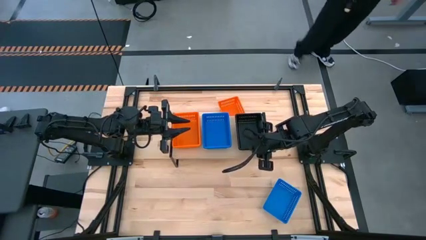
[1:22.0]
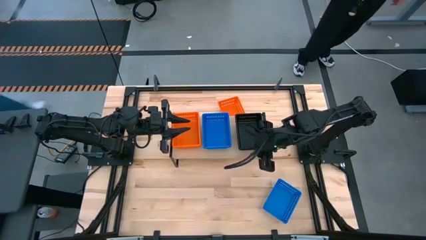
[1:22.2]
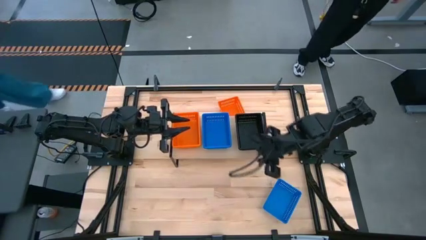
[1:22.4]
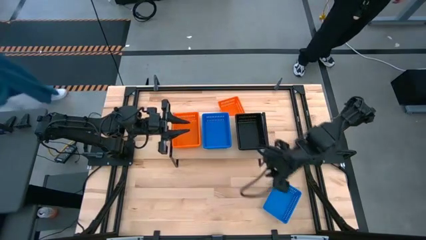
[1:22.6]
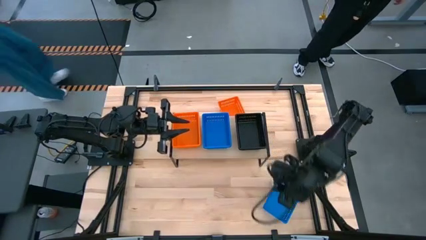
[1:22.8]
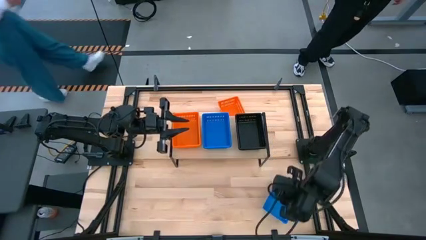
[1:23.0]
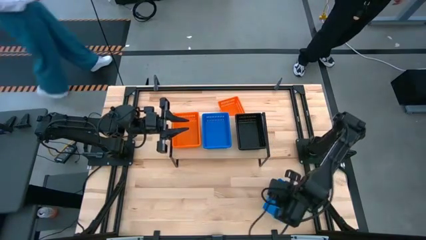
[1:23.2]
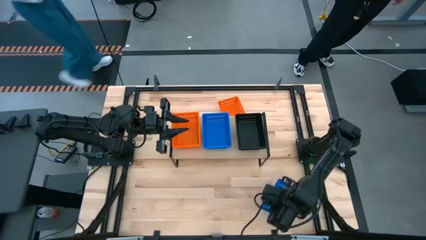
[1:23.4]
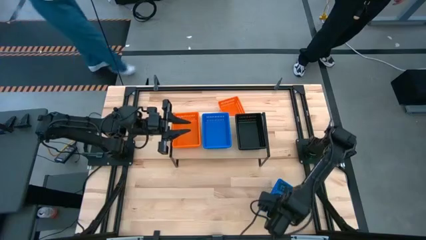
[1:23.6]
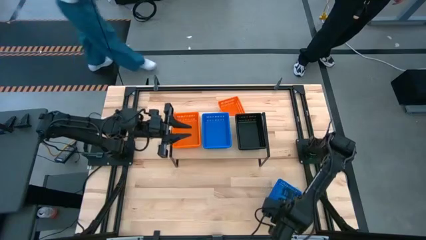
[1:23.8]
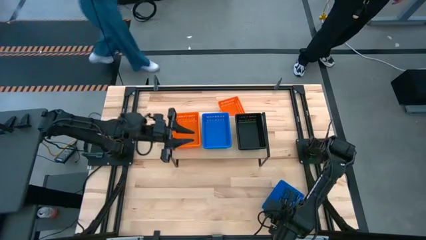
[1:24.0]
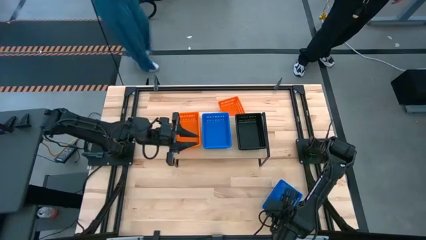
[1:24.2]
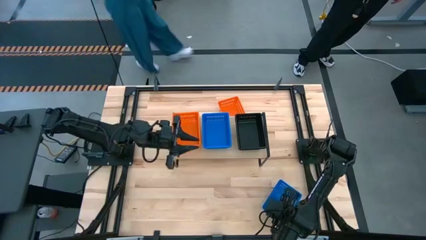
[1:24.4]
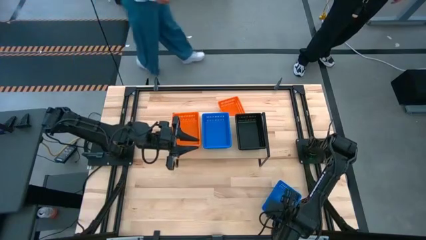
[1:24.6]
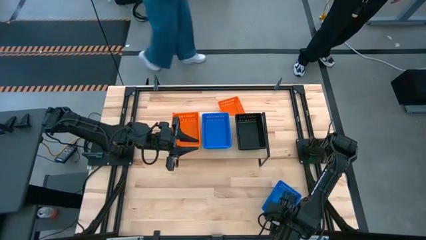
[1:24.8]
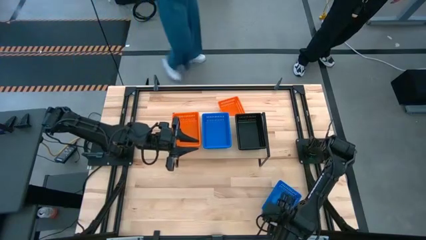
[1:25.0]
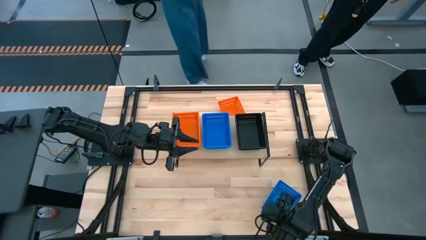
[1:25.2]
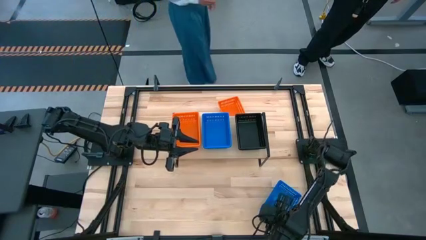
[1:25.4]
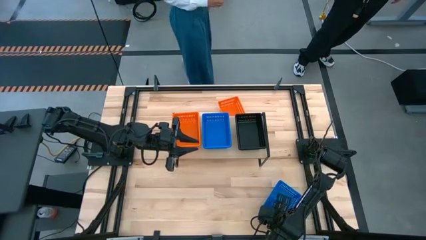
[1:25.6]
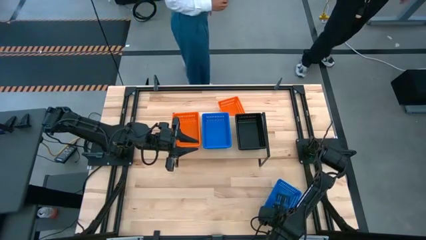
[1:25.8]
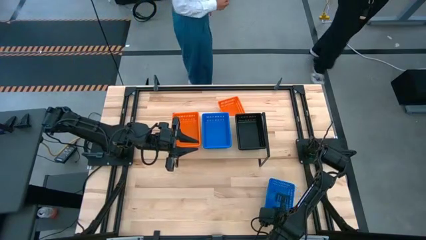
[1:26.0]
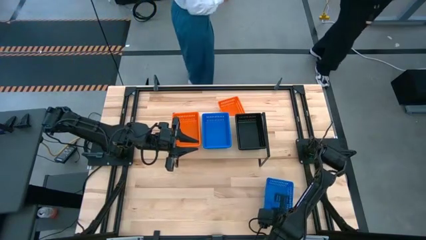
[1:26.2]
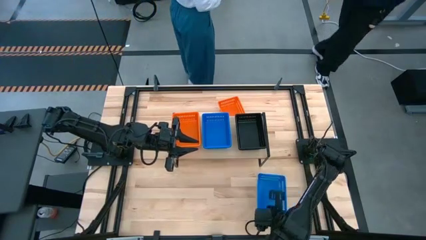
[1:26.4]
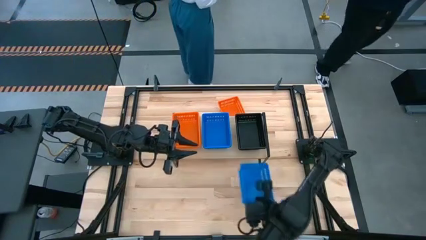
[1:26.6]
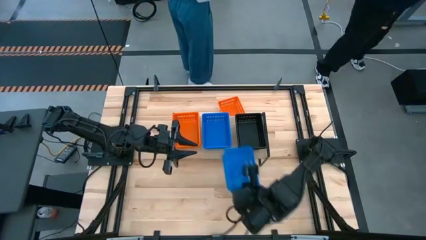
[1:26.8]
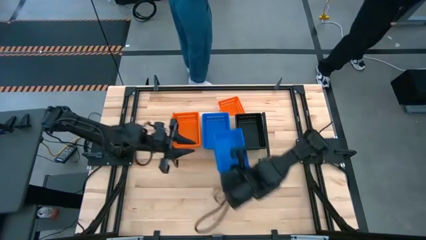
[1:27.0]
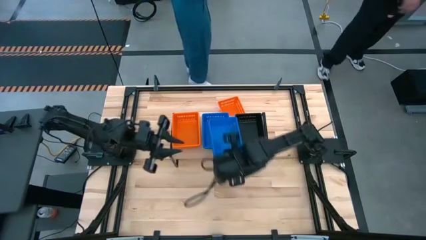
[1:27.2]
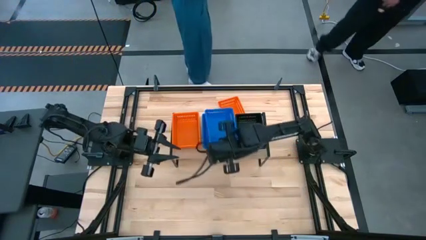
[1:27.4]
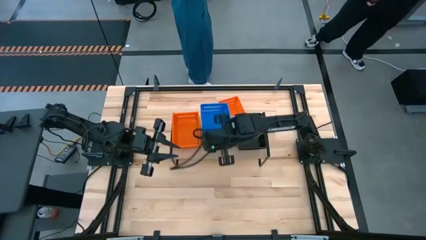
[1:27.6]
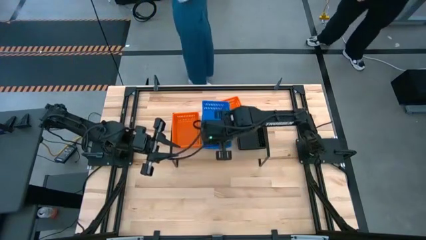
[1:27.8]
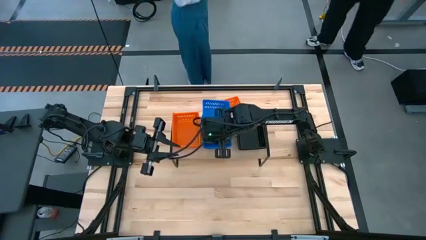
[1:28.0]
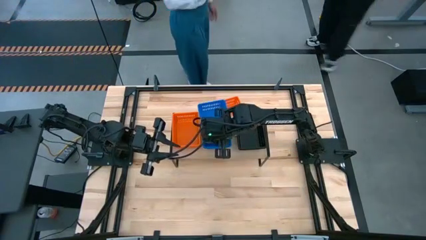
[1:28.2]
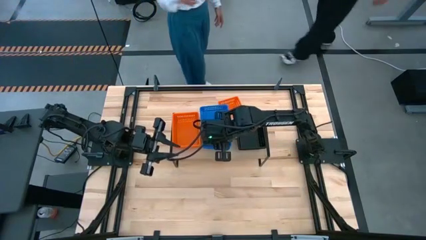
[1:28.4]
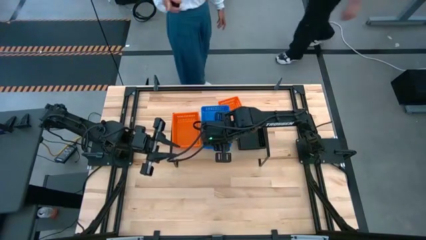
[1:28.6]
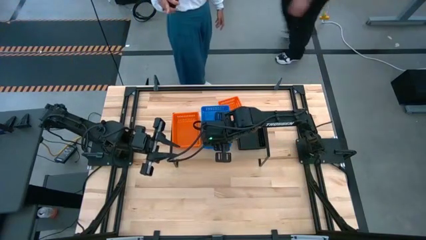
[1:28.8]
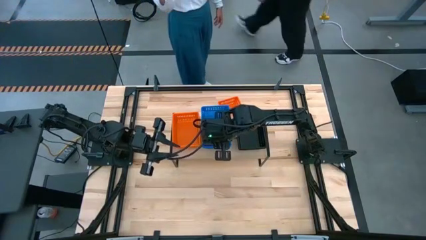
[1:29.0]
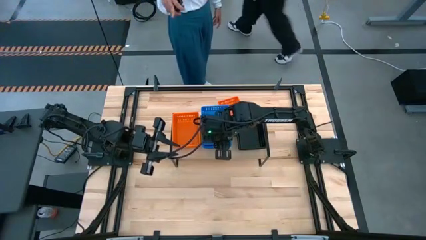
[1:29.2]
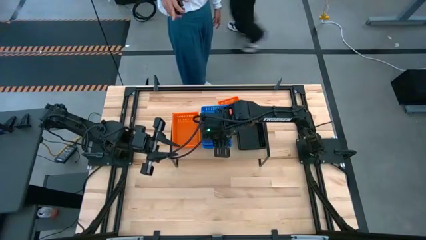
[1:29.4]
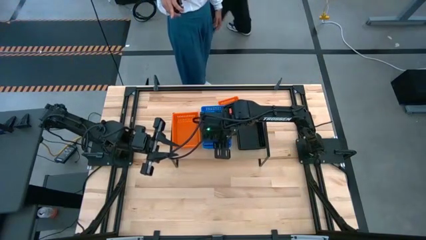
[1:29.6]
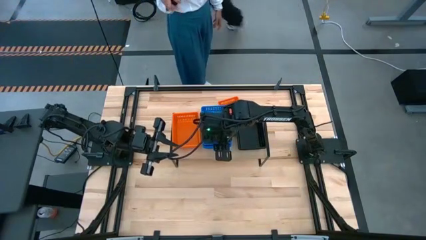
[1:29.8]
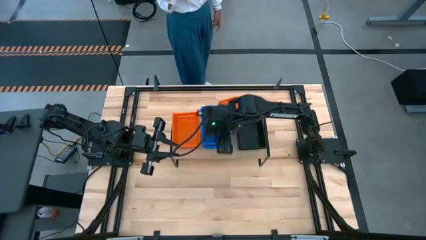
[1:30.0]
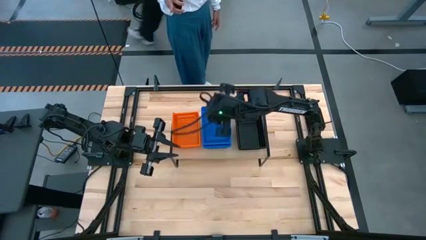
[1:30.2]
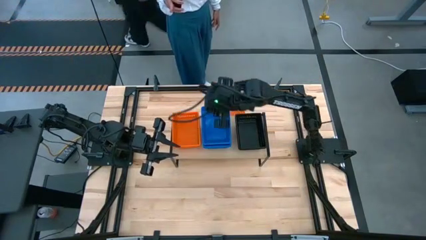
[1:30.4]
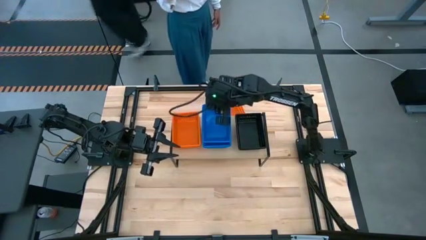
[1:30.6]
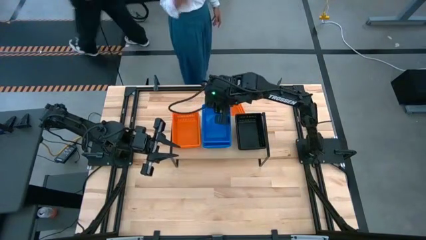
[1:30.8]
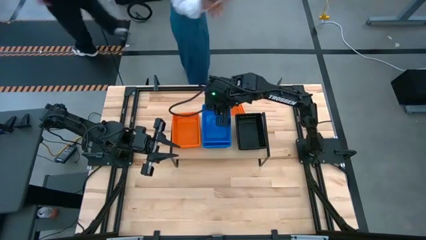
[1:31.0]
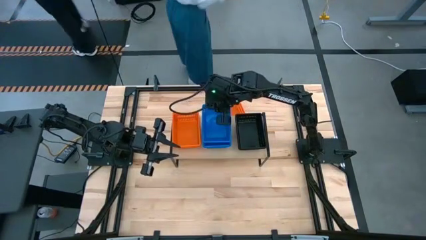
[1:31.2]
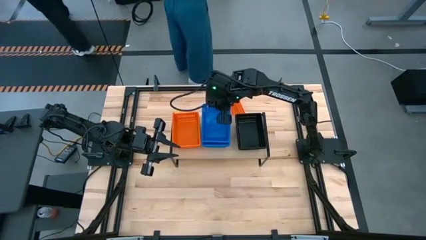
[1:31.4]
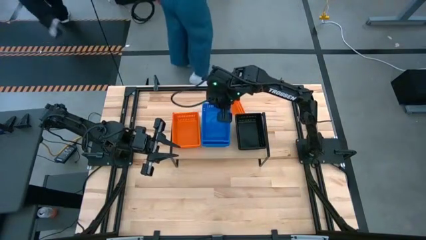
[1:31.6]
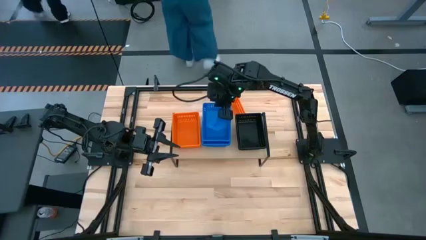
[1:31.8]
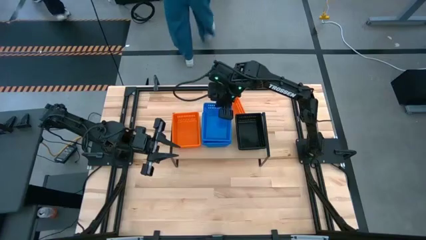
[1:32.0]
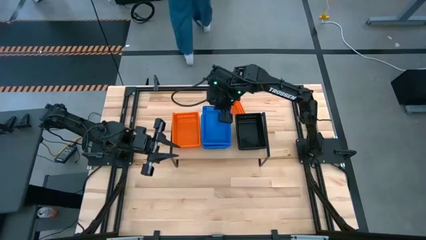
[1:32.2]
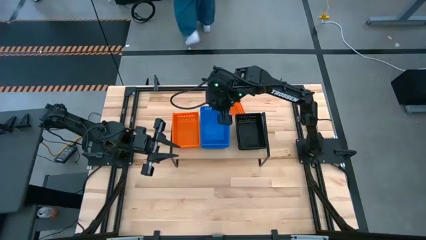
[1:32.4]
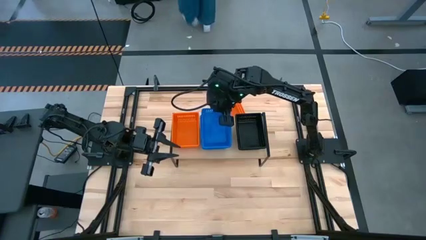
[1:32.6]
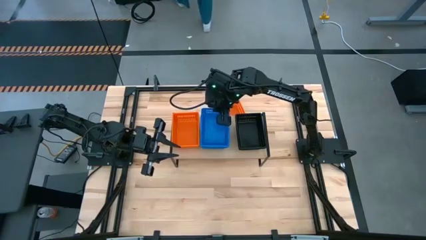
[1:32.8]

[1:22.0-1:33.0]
Task: Stack baskets on shelf by color
Stack the blue bin on top of the blue bin on the shelf

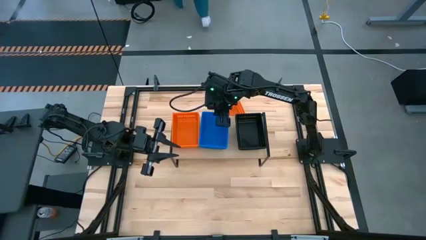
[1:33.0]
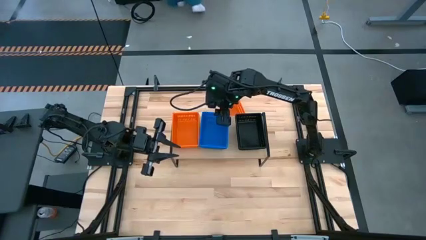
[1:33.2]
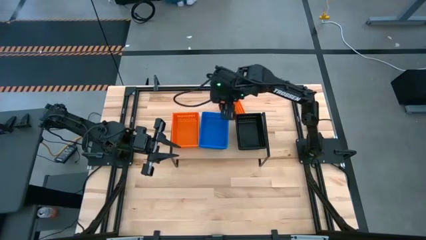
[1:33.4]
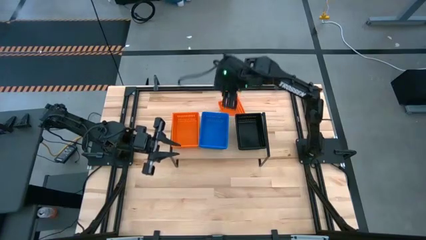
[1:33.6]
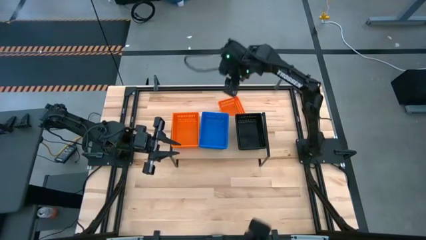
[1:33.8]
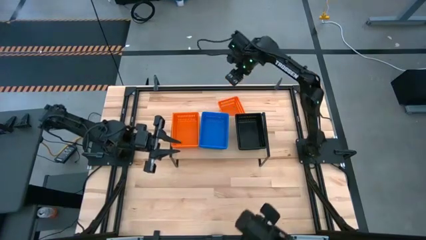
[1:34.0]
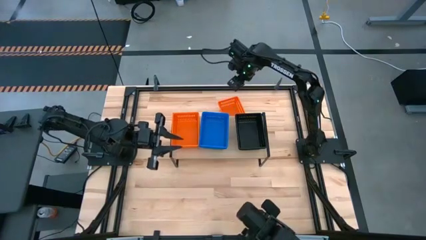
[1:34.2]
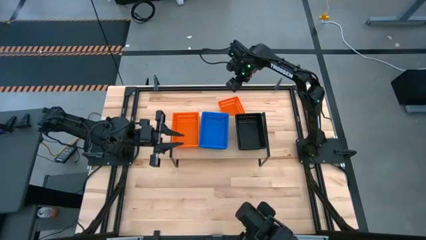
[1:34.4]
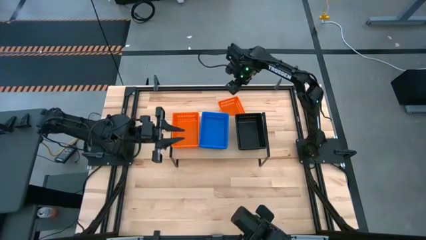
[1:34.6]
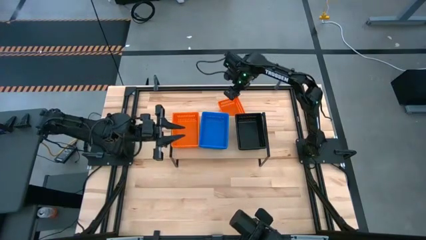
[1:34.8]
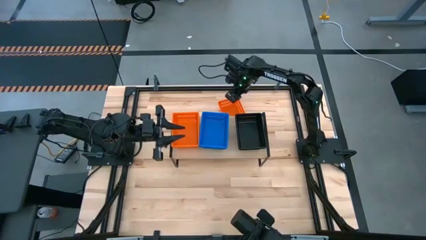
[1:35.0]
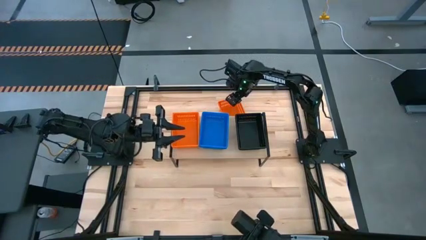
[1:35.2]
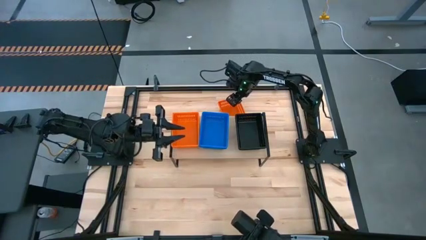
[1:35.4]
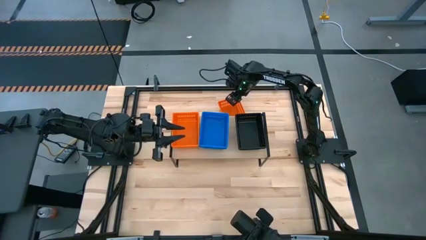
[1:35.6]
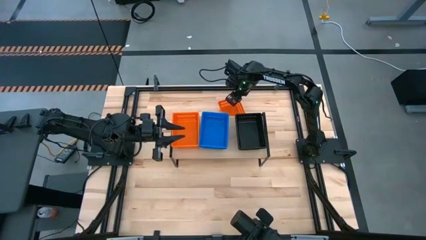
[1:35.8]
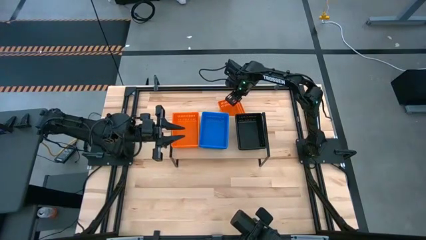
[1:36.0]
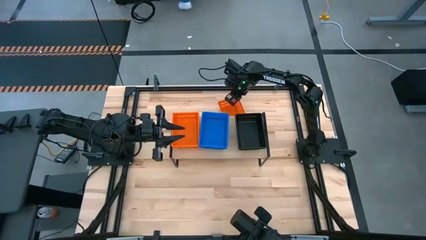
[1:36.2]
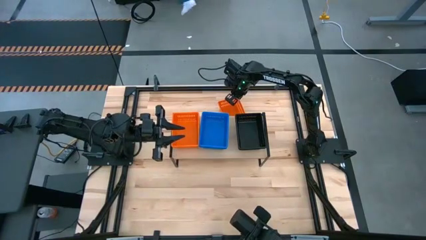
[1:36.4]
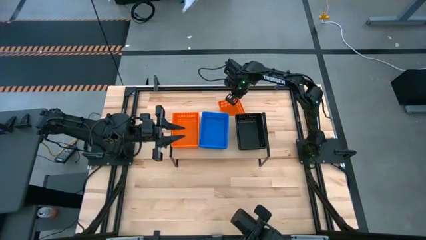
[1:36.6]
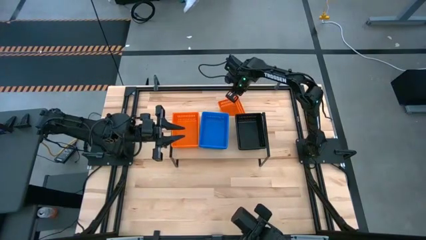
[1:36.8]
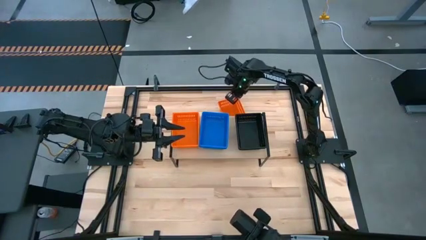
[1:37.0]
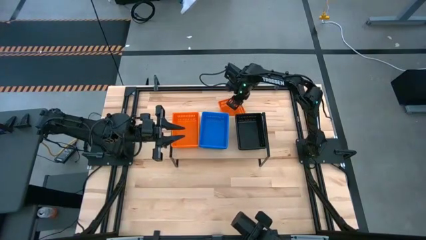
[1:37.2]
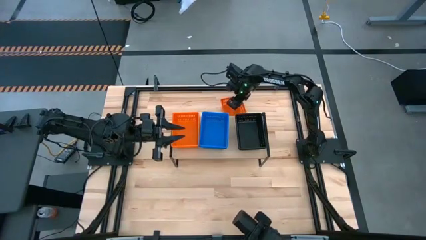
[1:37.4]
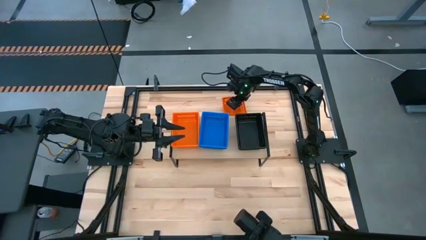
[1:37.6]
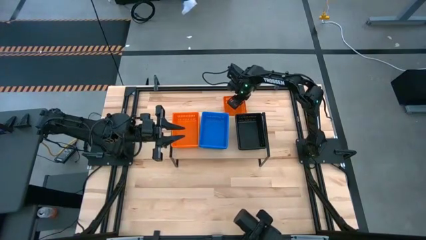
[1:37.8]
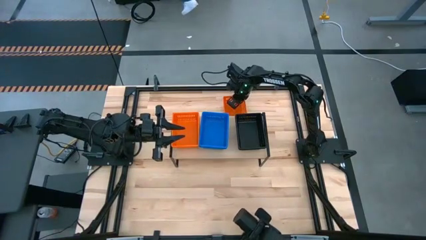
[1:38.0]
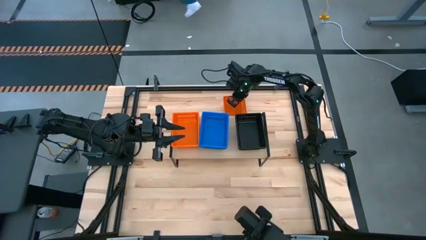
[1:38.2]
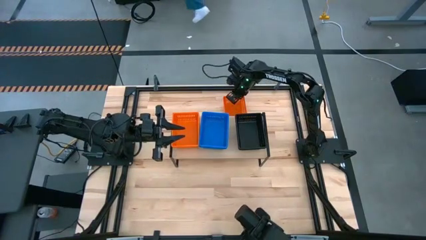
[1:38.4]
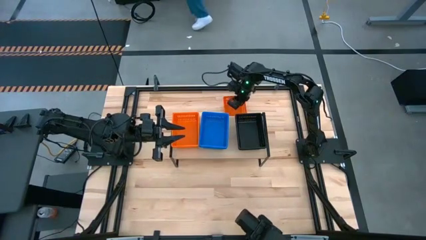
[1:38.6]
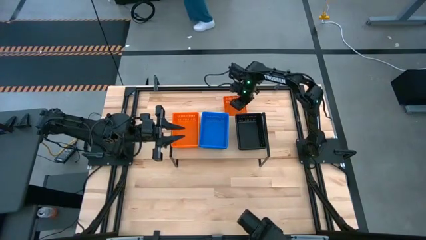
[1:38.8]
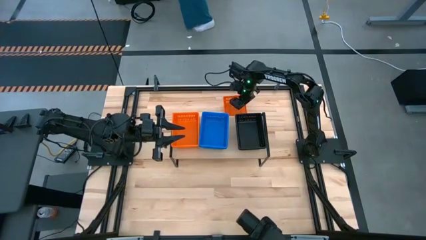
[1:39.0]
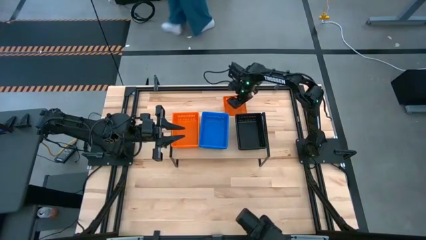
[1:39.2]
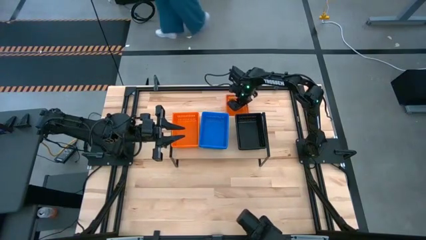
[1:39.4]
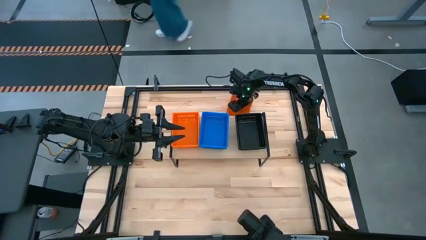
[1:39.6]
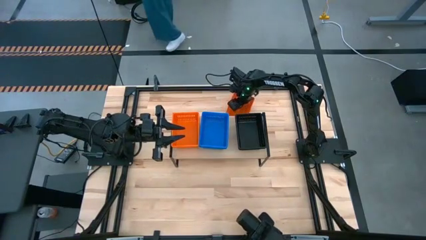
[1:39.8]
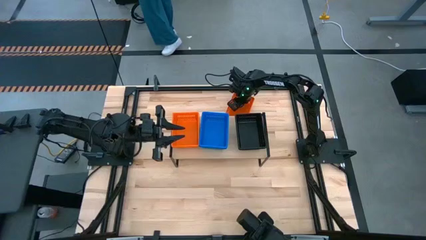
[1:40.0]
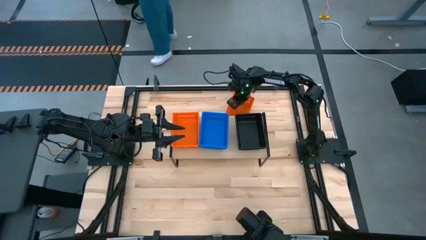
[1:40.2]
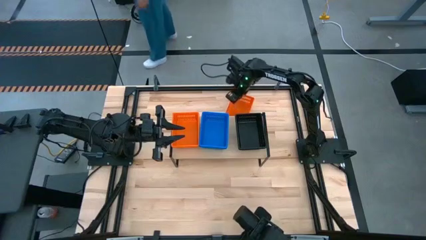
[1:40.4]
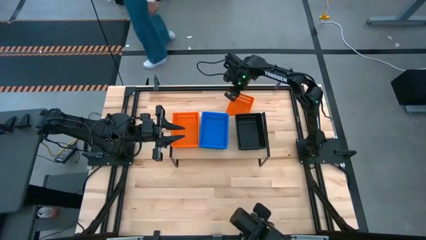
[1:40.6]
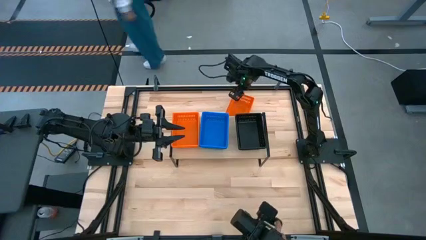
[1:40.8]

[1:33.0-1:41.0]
Stack the orange bin on top of the orange bin on the shelf
